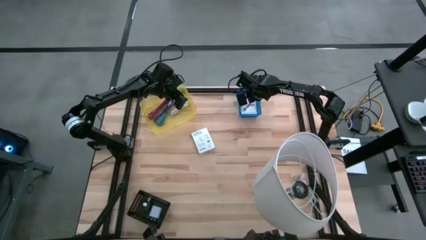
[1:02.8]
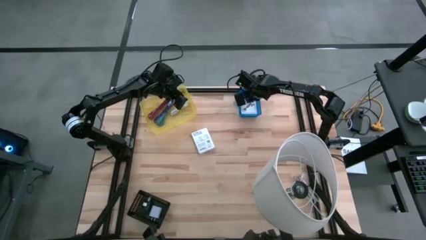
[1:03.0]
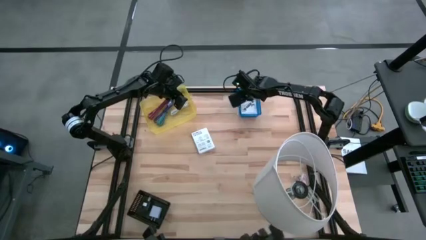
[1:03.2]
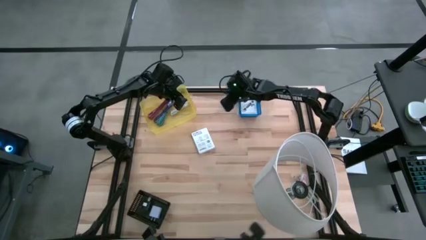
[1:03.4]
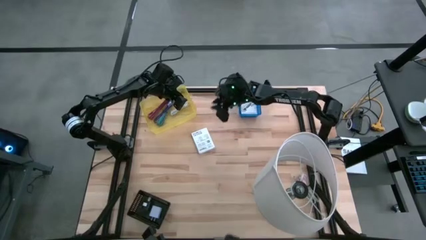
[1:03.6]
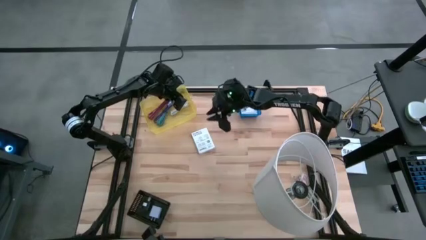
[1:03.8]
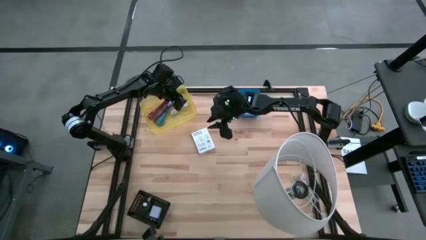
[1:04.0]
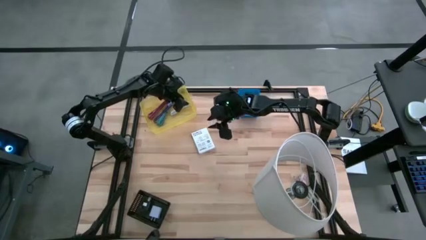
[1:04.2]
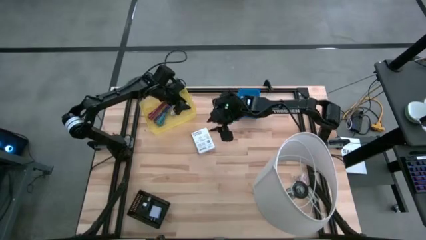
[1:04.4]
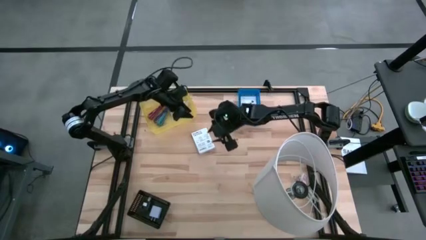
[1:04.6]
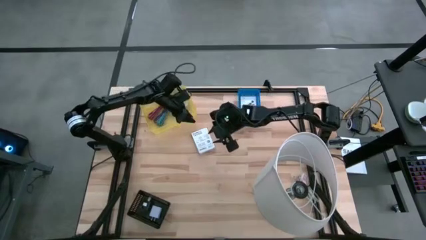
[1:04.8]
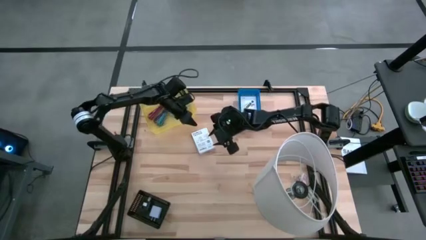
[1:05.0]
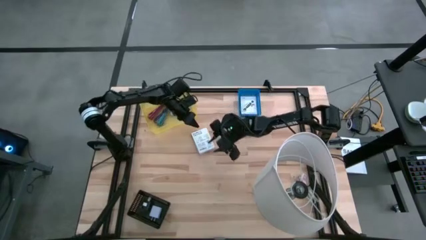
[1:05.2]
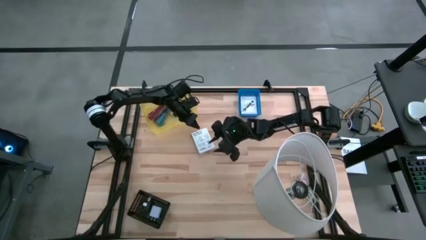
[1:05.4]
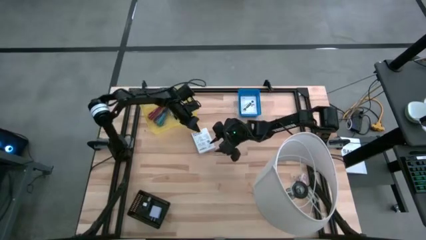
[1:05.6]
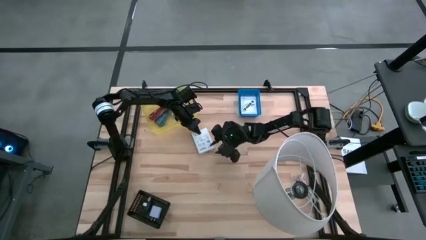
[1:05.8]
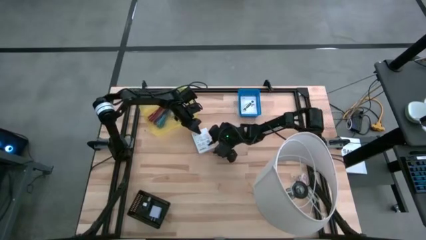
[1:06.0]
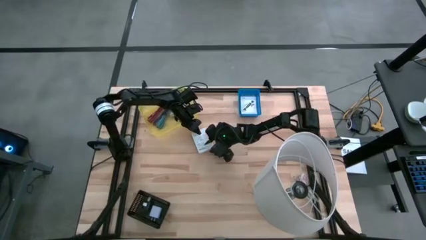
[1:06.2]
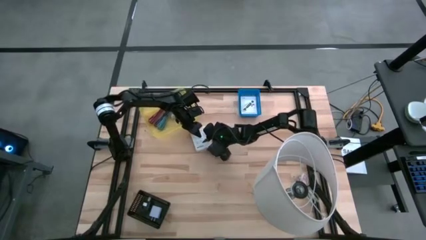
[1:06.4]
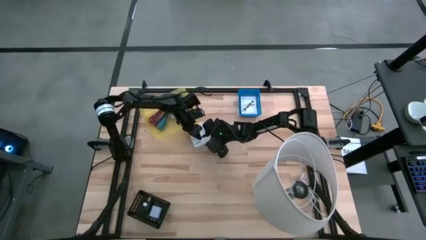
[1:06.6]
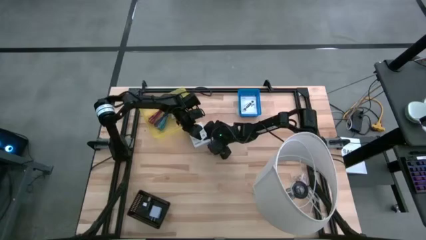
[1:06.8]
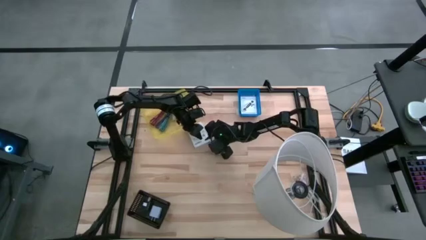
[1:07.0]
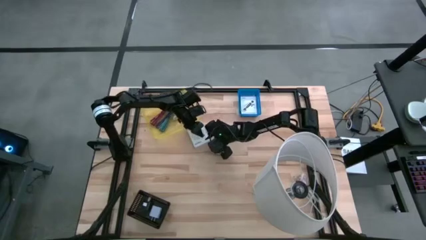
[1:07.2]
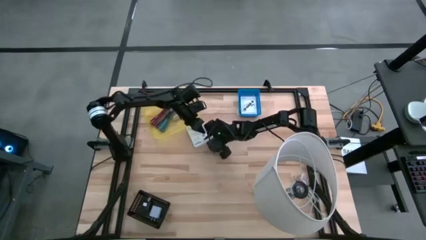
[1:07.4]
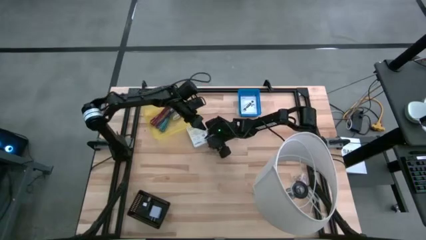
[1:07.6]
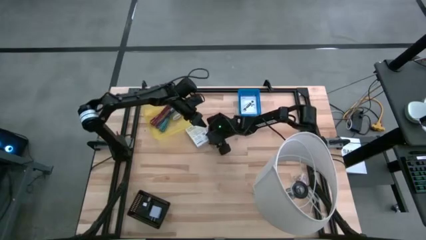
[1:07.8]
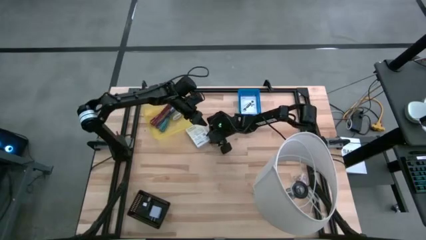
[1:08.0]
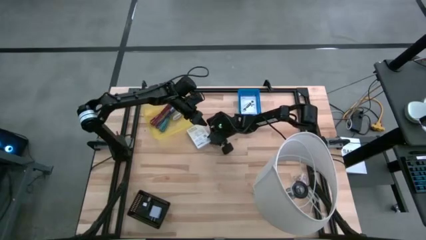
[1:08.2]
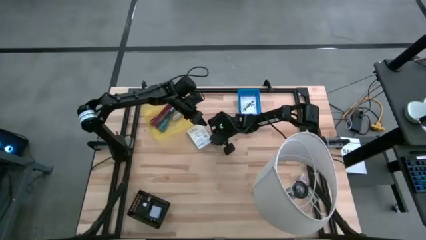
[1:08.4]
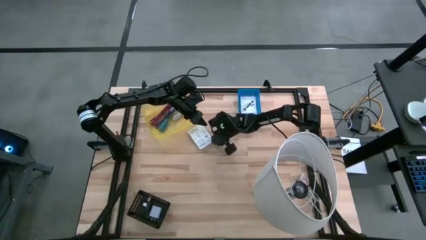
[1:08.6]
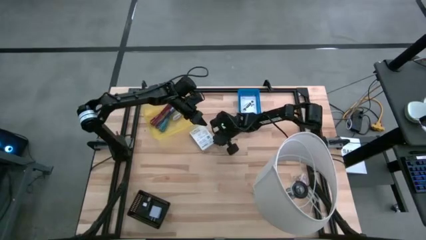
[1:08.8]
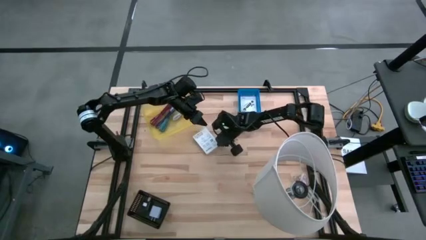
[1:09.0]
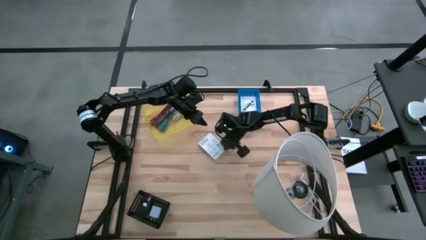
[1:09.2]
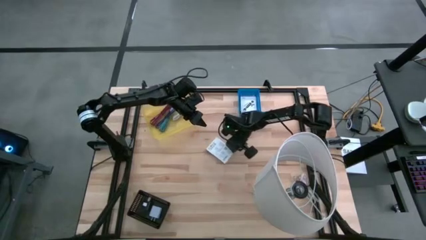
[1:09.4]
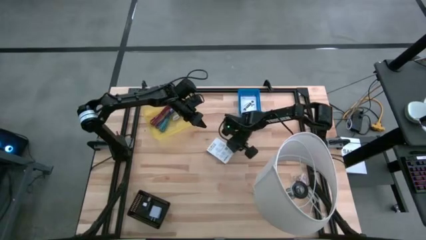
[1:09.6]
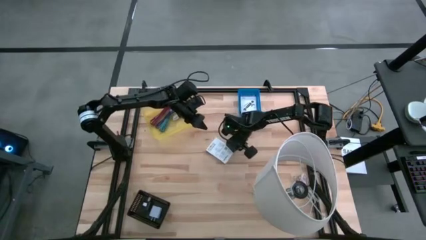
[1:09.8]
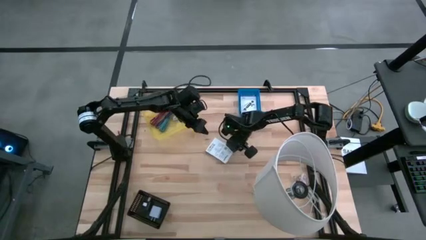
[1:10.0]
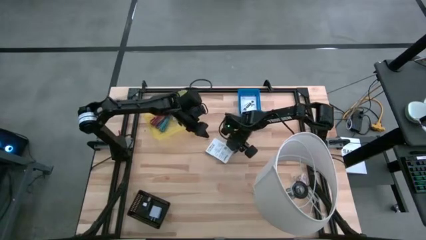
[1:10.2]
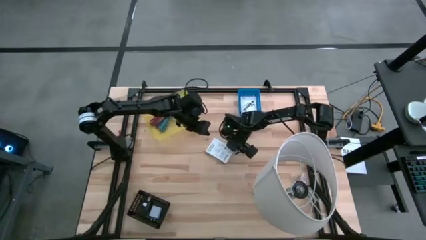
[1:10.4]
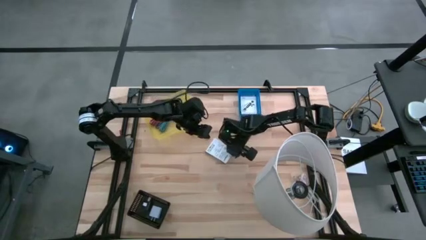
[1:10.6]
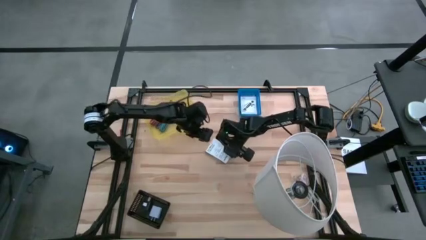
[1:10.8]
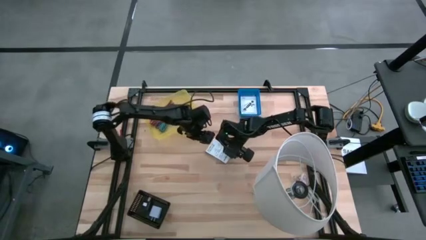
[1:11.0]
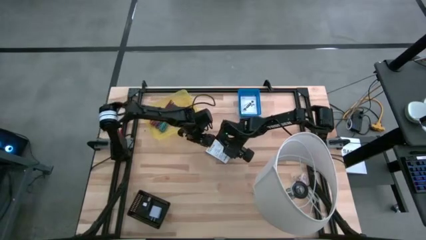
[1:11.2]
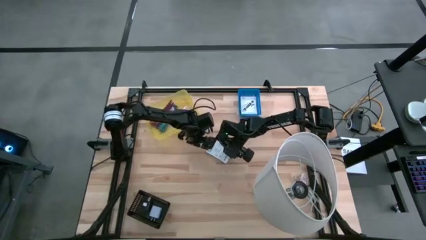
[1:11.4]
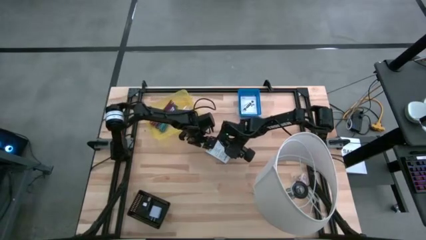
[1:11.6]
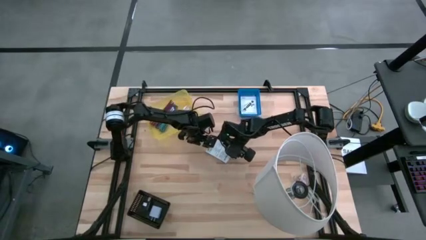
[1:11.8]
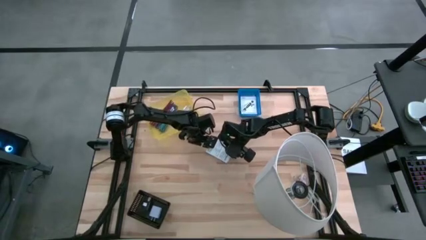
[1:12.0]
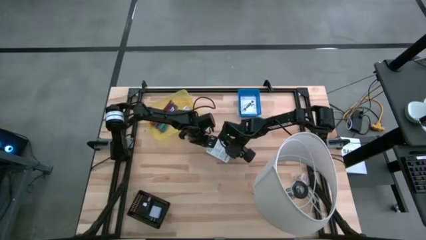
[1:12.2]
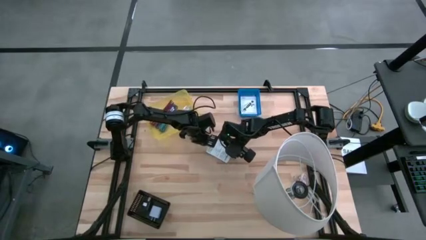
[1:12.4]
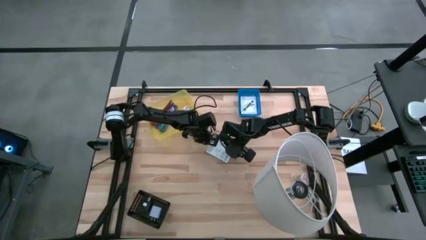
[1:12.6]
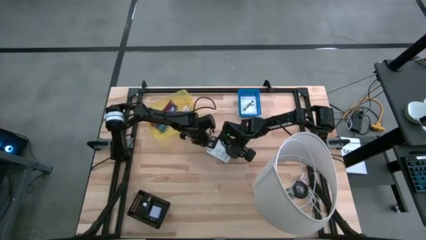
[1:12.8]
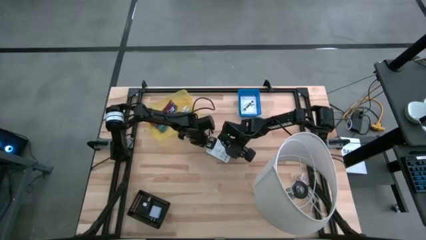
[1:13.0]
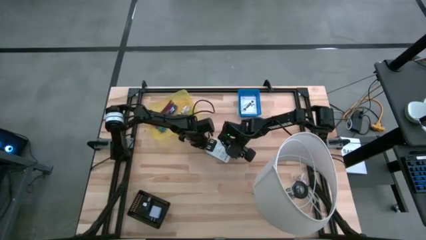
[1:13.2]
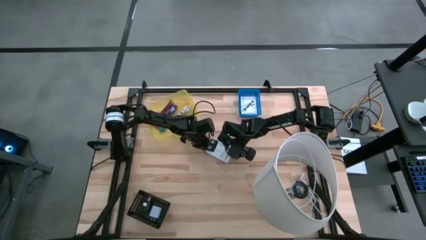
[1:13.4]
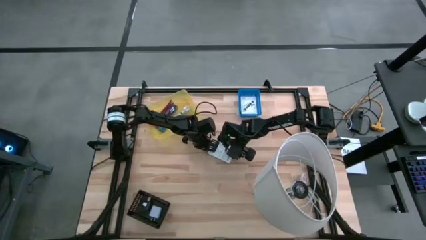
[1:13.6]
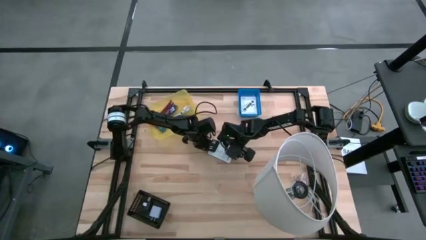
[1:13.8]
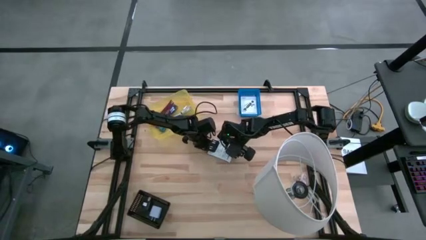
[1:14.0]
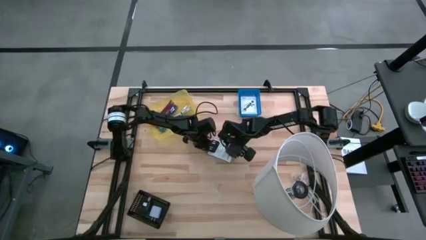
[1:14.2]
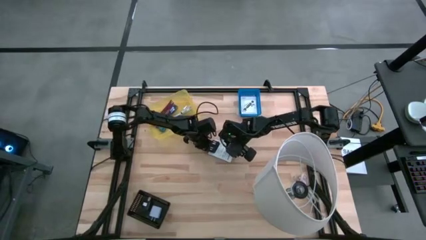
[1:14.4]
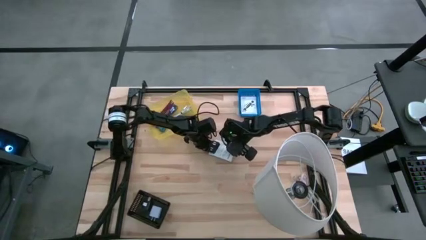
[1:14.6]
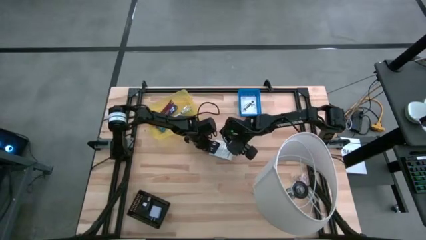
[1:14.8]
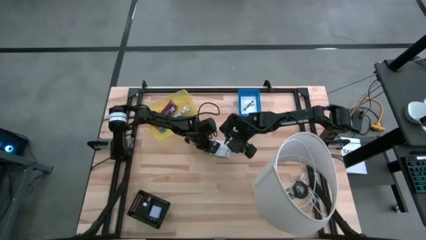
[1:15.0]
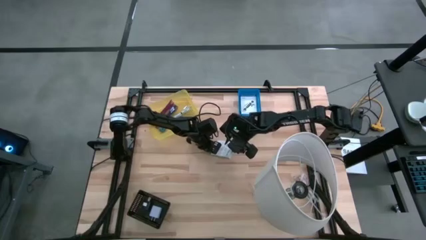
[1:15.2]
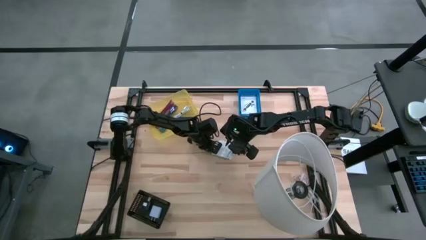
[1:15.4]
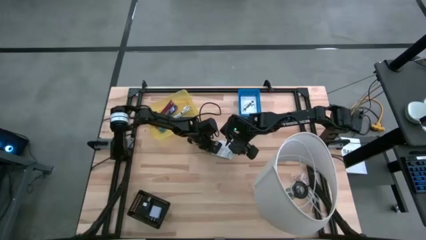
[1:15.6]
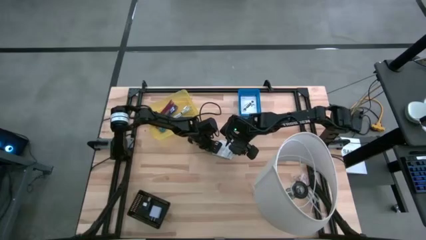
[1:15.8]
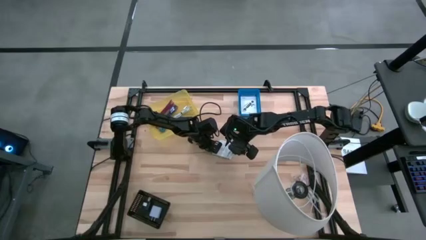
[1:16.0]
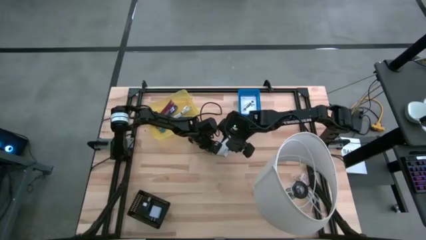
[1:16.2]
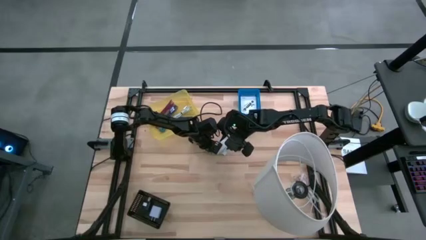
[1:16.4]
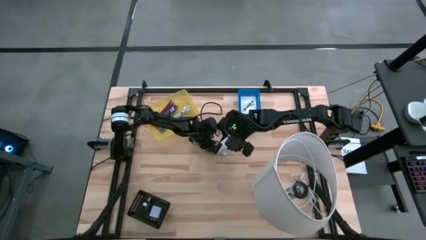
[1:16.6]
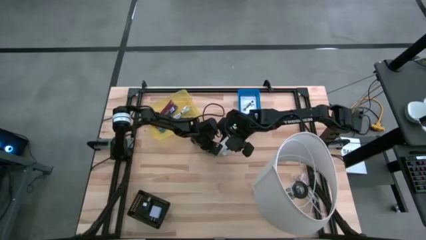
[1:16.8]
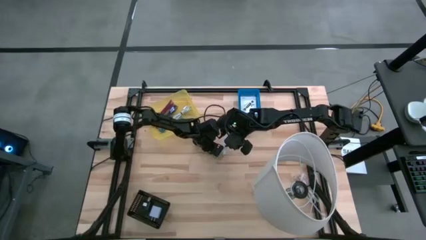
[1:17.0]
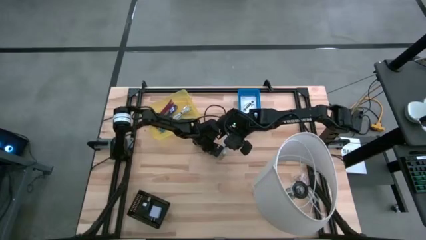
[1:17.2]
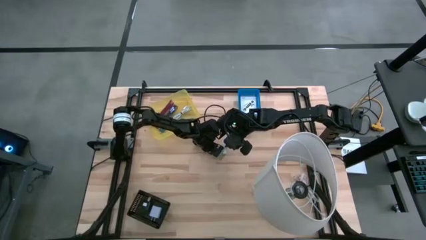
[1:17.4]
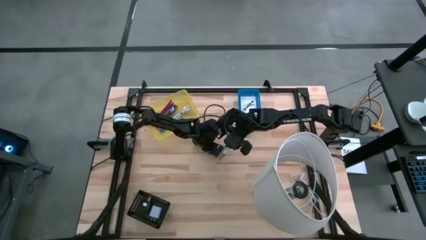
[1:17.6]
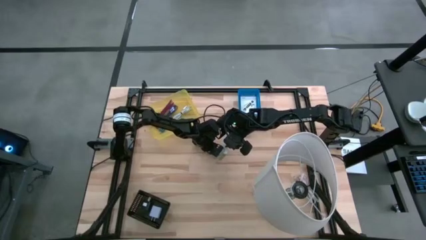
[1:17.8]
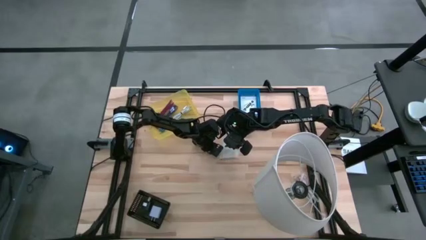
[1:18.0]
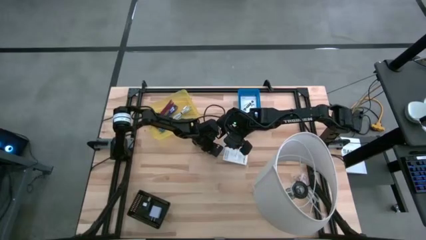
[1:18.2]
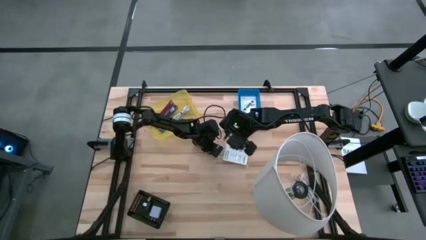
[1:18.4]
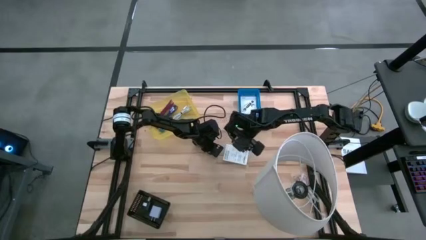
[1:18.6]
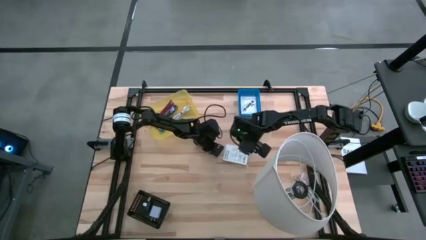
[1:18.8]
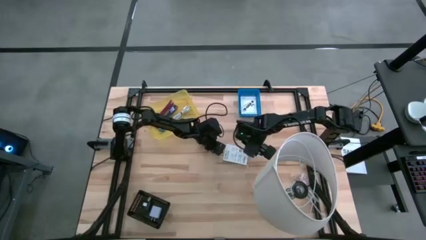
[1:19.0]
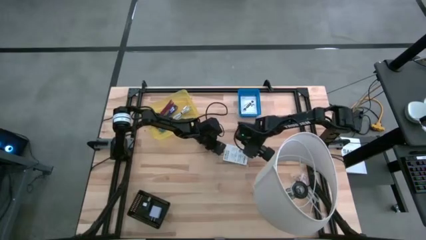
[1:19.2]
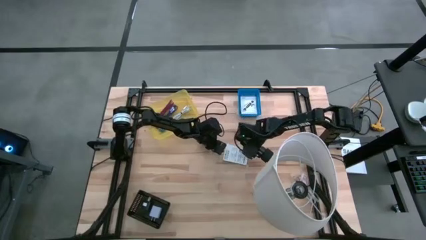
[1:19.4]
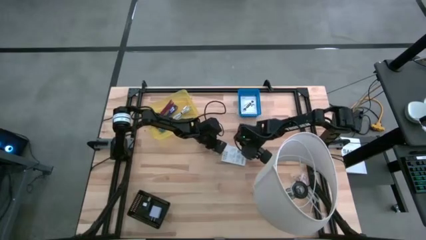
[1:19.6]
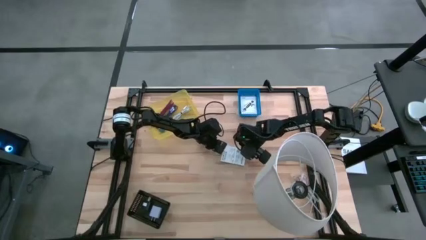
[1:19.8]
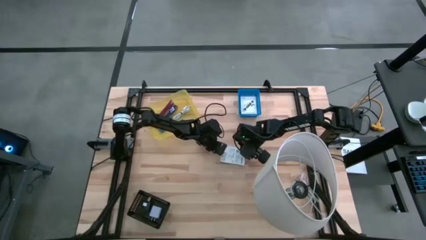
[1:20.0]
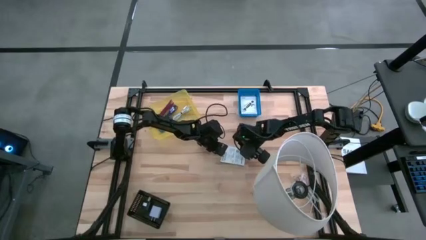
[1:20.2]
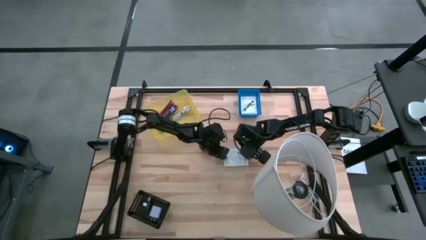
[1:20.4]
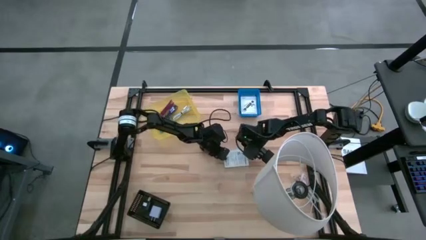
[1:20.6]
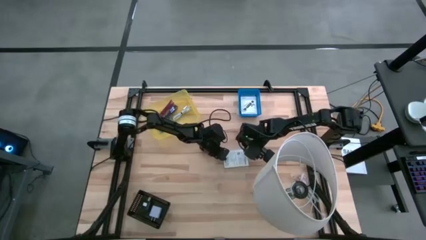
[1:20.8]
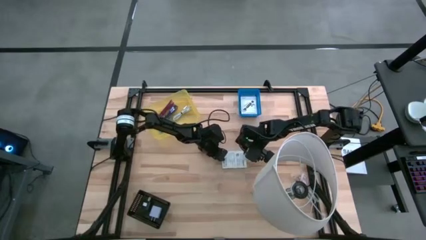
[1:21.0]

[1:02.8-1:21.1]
Task: Pick and place items into bin
Put the card reader box into the blue bin
